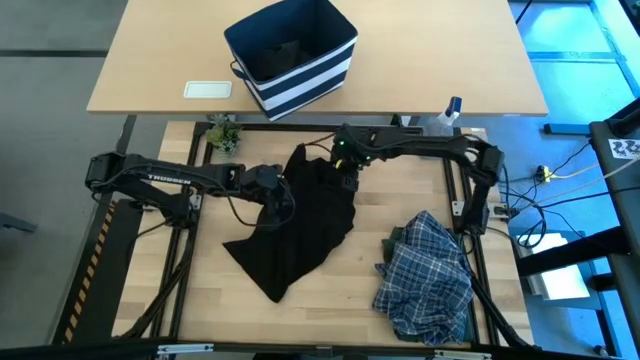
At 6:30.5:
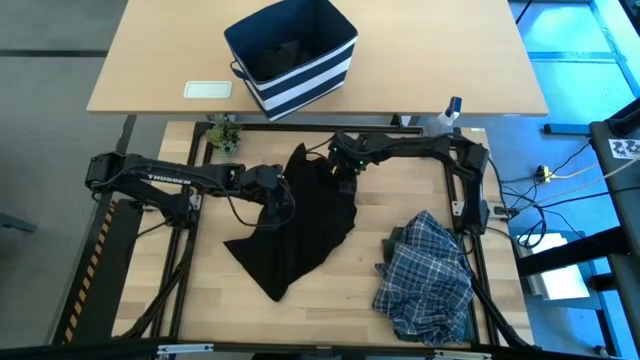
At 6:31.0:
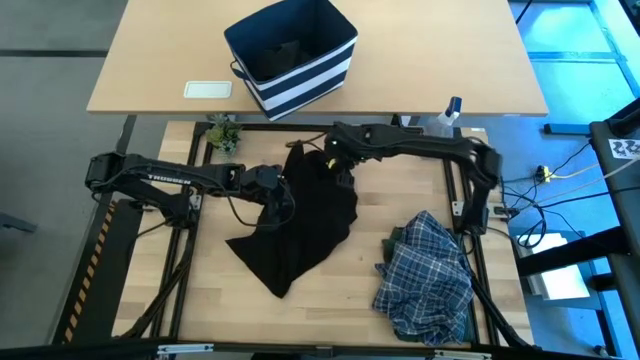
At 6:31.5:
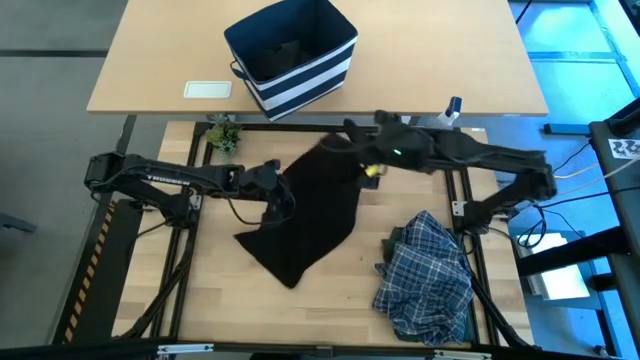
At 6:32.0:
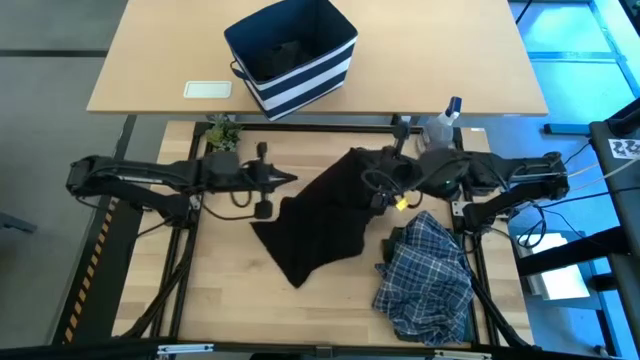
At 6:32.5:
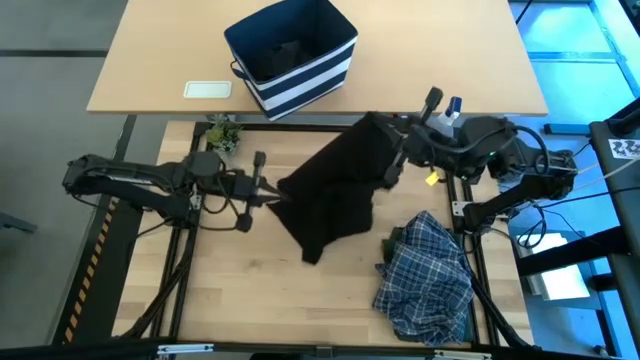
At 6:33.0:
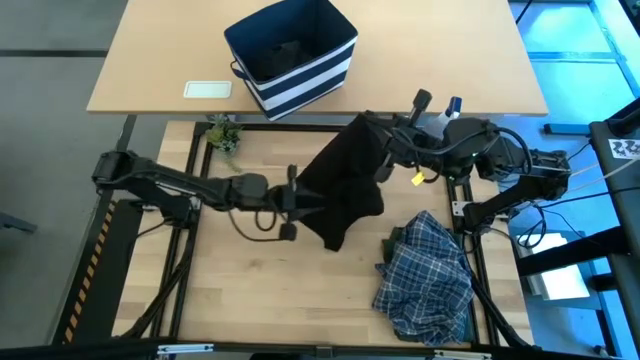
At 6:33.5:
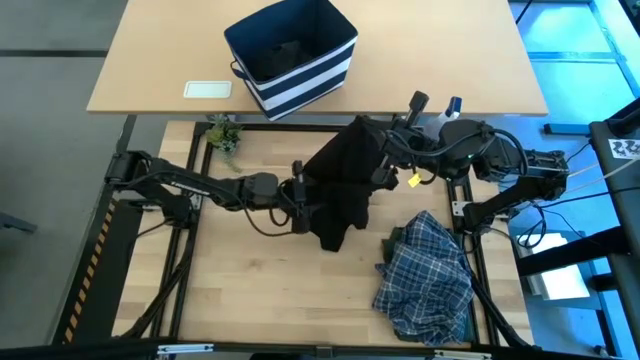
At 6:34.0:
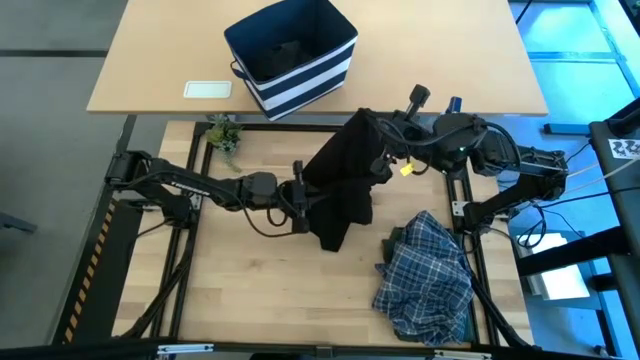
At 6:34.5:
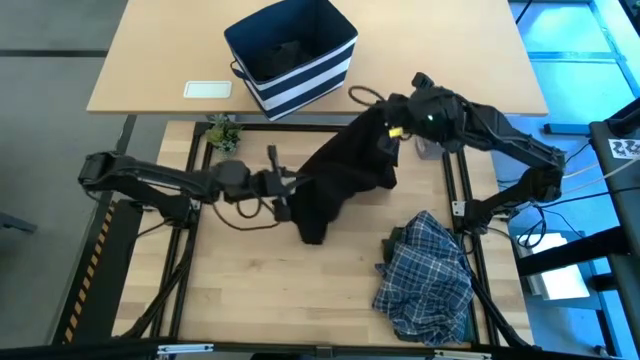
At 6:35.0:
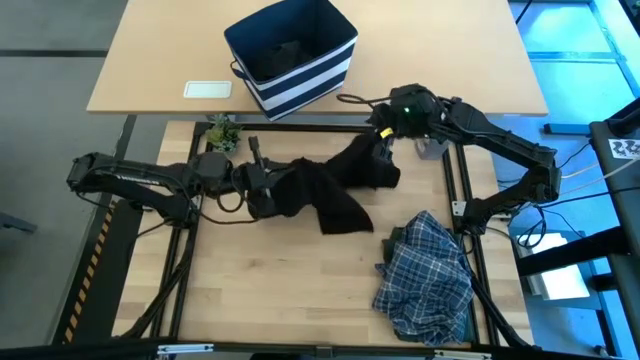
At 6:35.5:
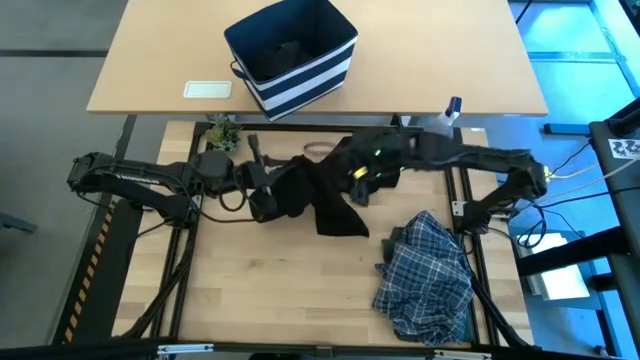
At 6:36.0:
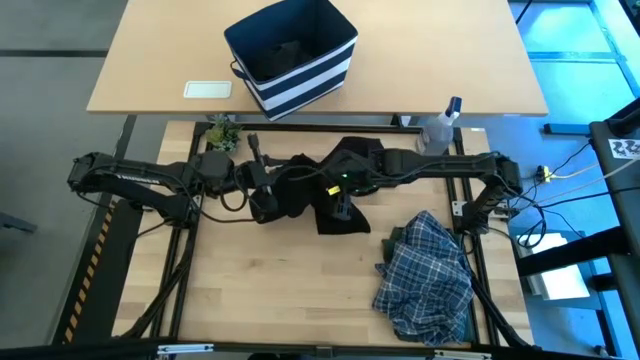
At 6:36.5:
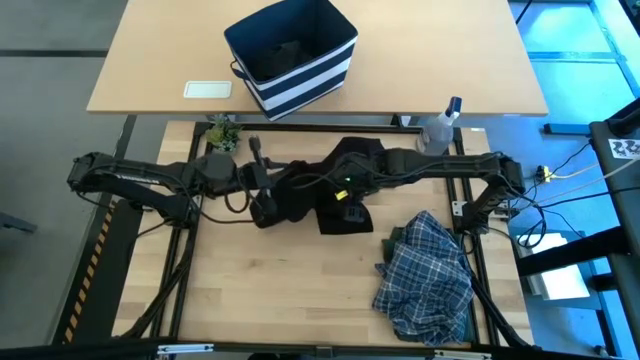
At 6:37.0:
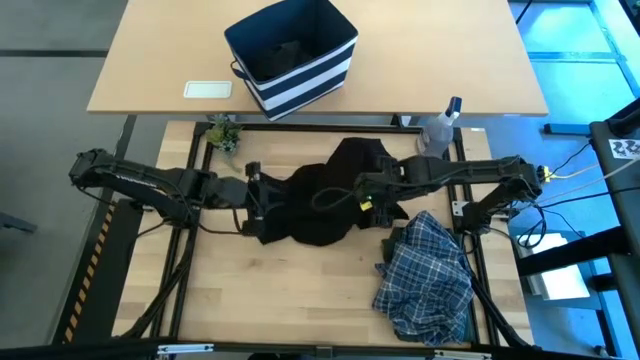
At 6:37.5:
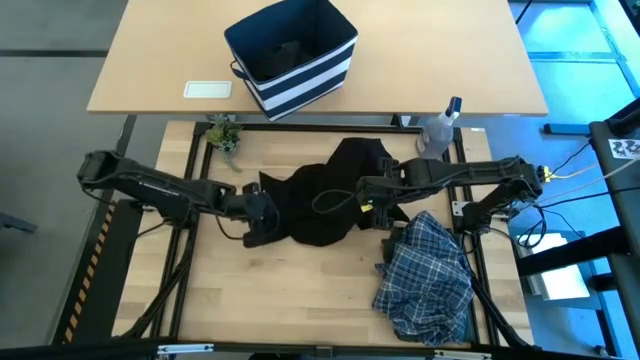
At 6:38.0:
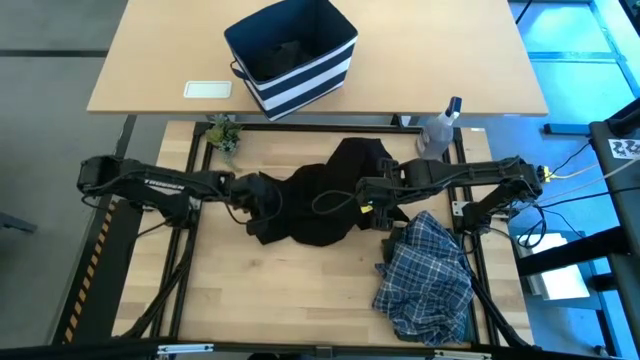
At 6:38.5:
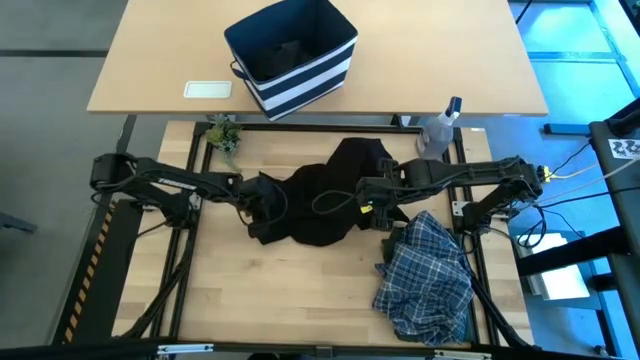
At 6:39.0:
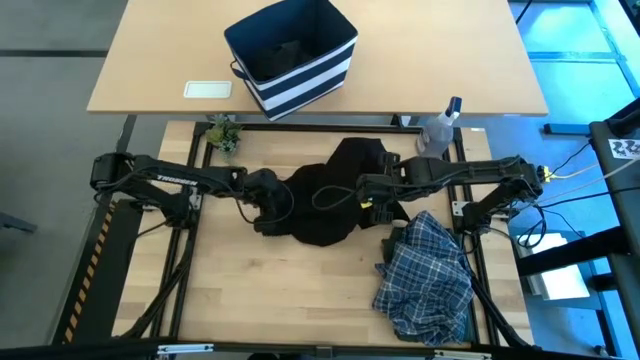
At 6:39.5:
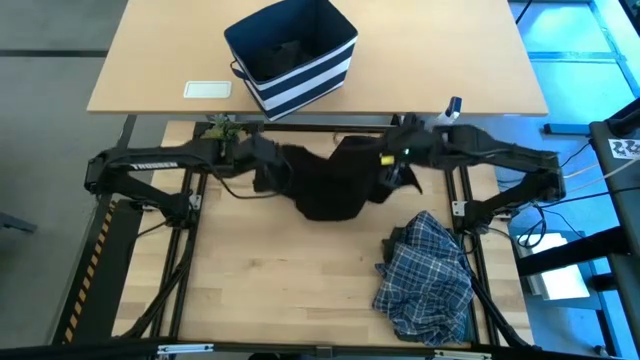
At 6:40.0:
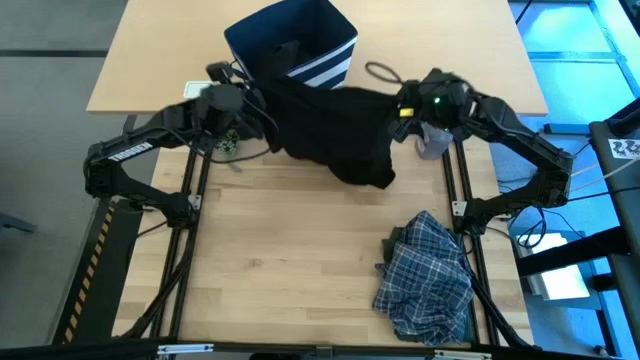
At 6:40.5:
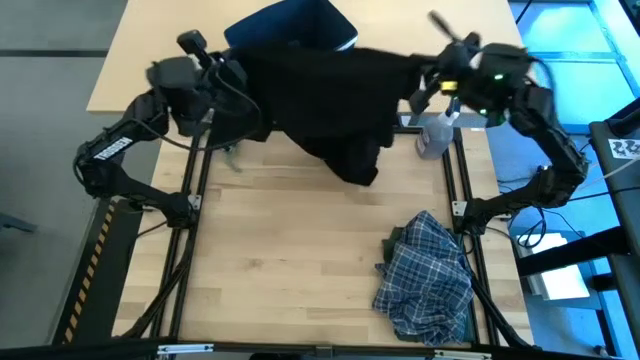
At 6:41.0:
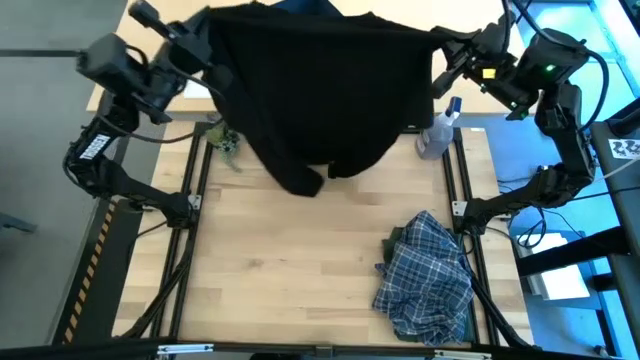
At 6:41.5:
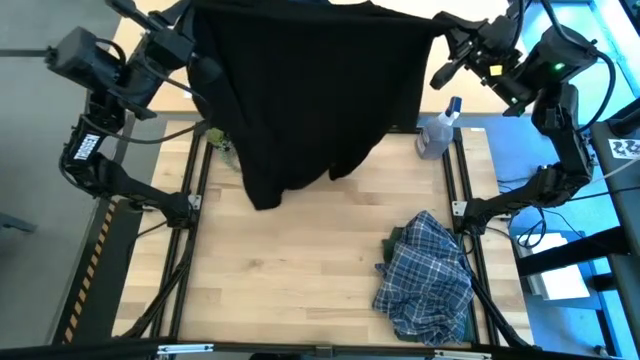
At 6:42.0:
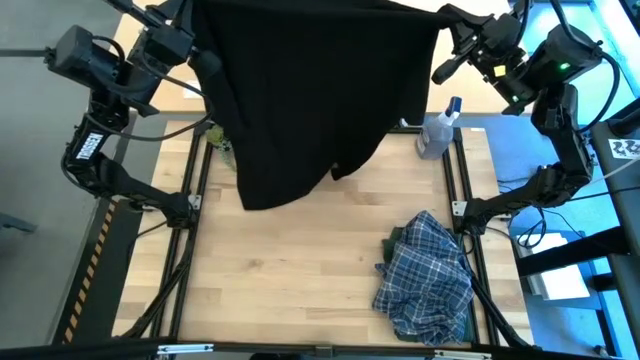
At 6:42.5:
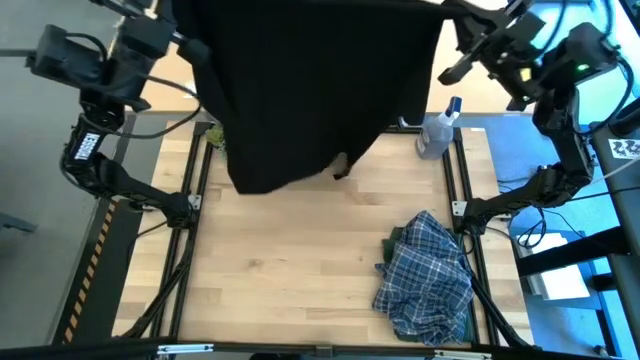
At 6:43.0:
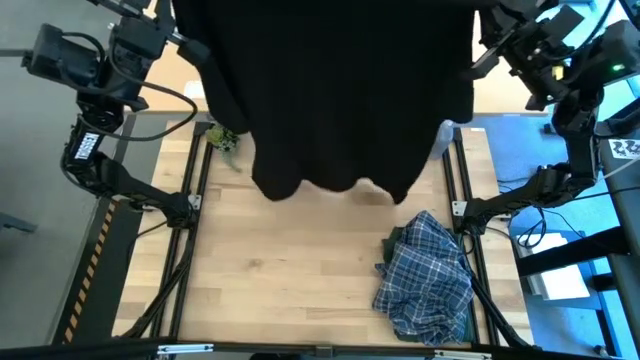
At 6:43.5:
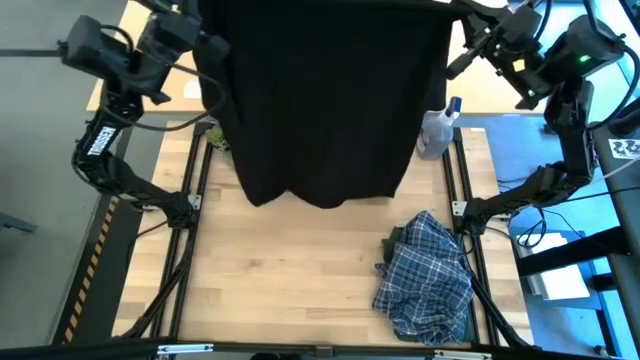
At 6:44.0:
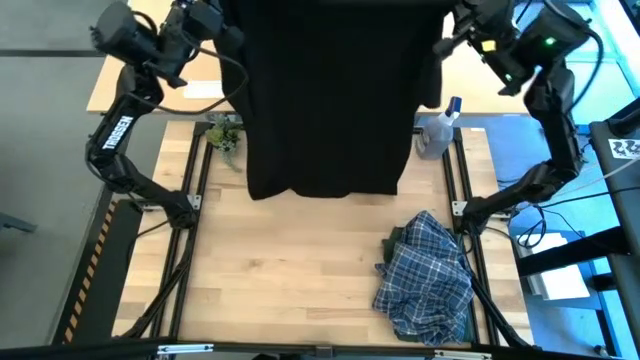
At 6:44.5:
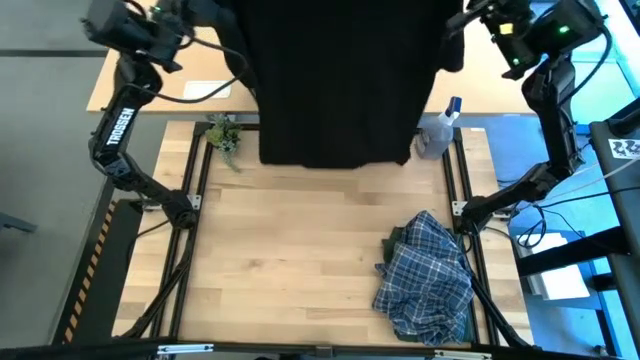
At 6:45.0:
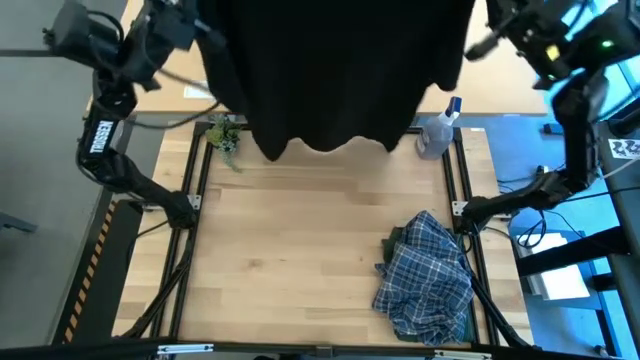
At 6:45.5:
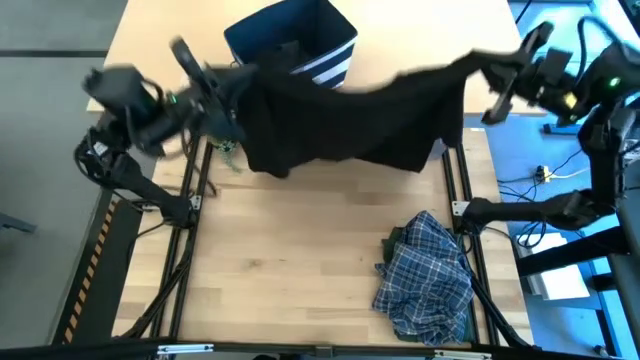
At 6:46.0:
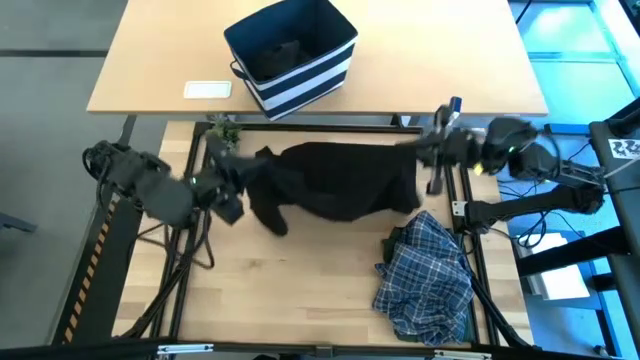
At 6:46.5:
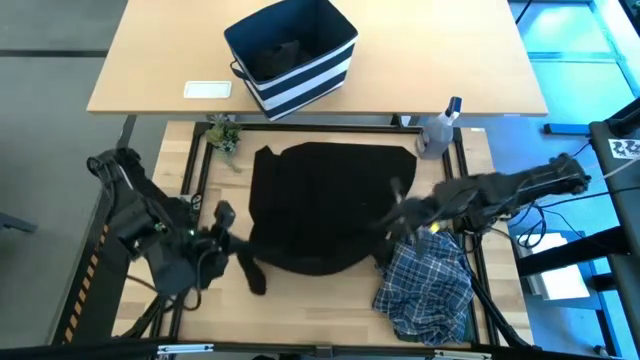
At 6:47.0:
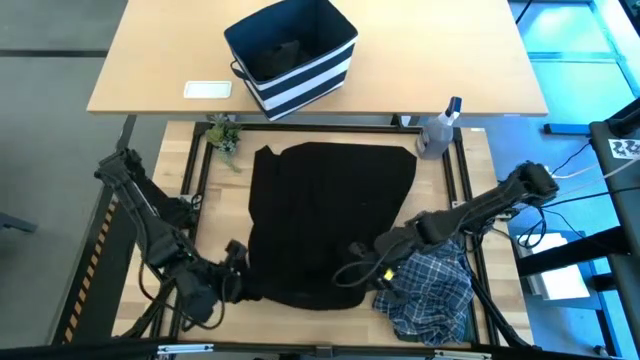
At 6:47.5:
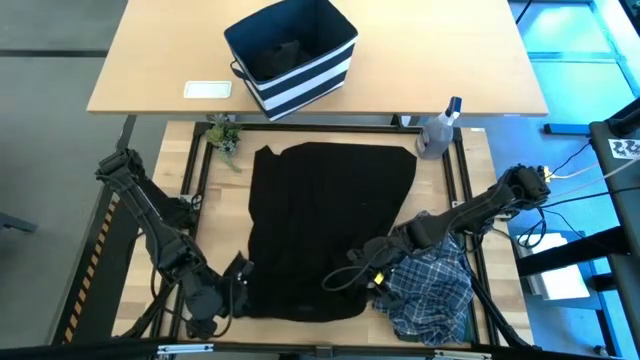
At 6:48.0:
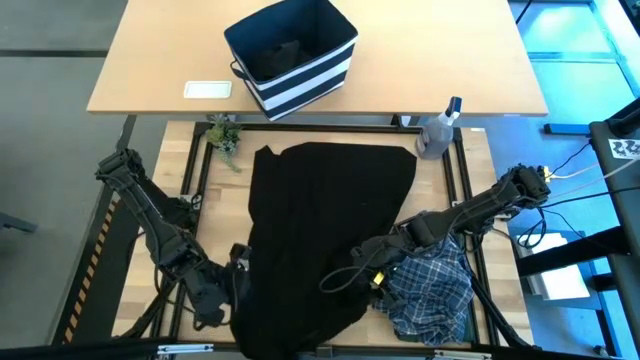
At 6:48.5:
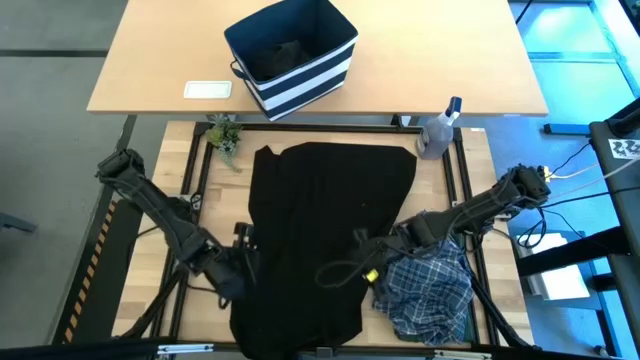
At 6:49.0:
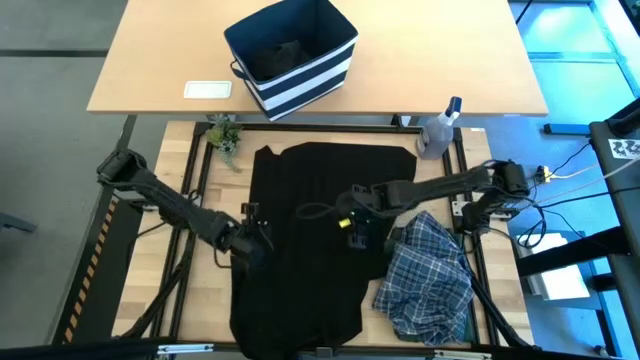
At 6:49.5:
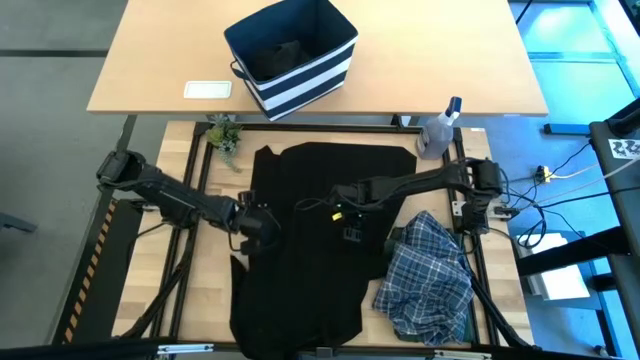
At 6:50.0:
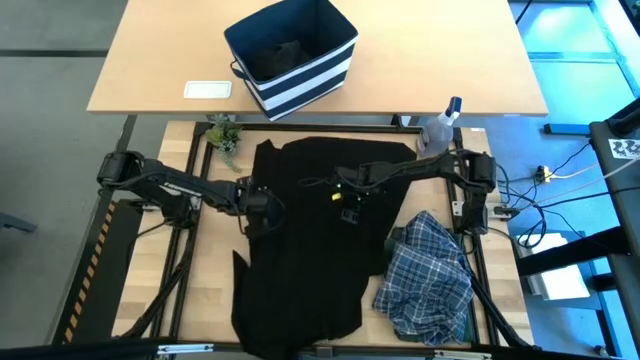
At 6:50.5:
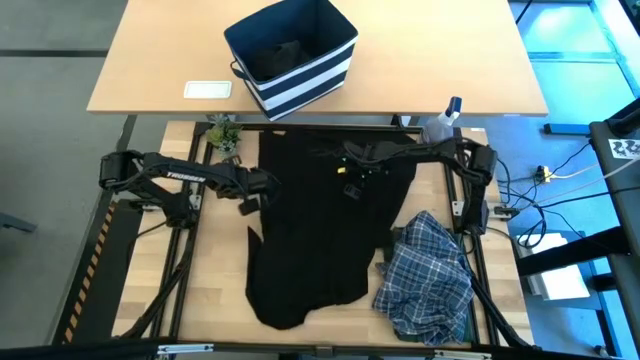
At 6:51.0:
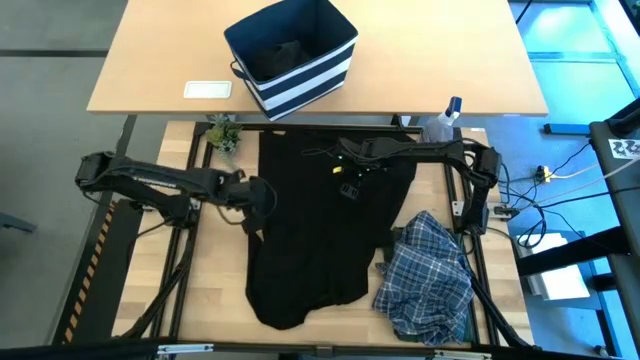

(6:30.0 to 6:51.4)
Task: Fold Laundry from Bin
Fold the black shirt
